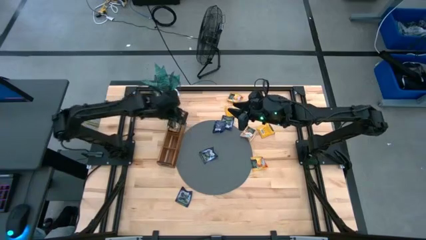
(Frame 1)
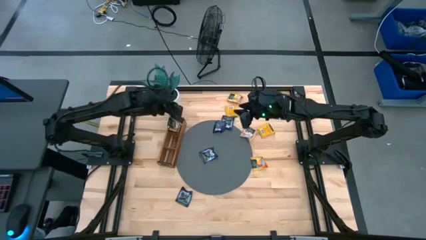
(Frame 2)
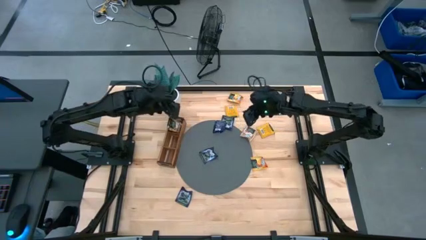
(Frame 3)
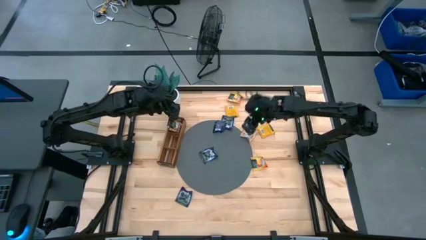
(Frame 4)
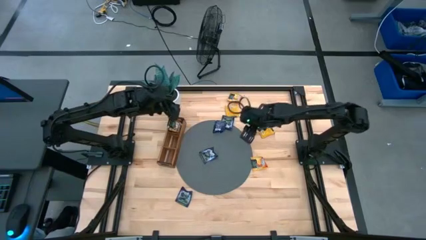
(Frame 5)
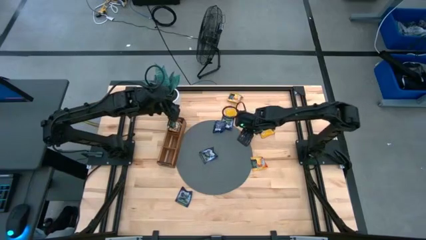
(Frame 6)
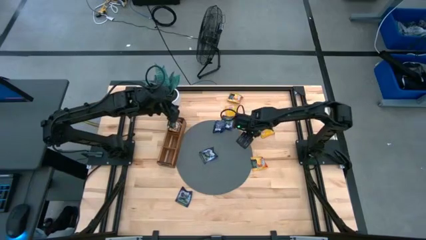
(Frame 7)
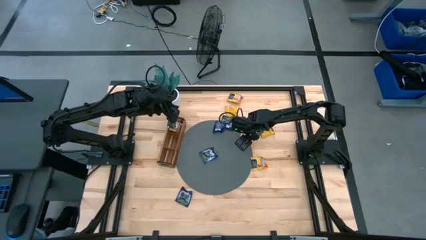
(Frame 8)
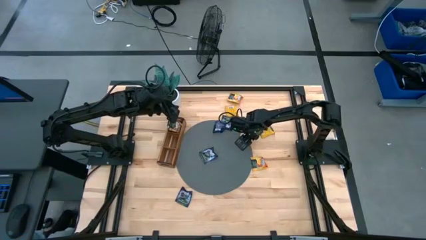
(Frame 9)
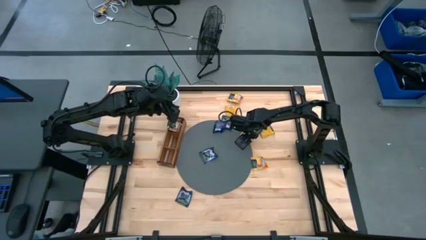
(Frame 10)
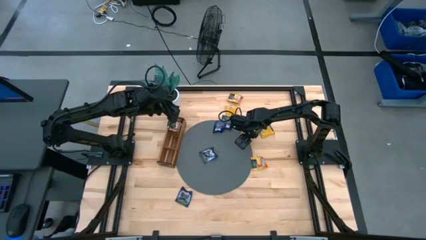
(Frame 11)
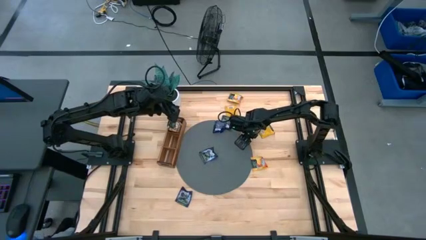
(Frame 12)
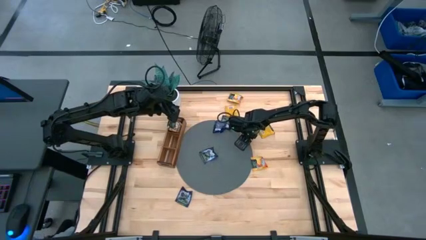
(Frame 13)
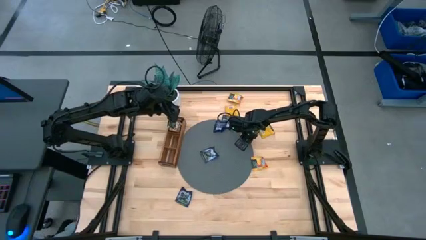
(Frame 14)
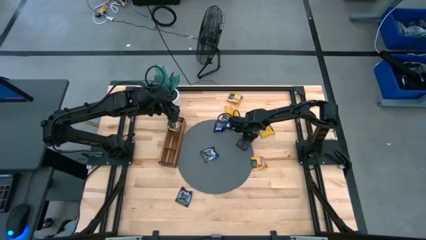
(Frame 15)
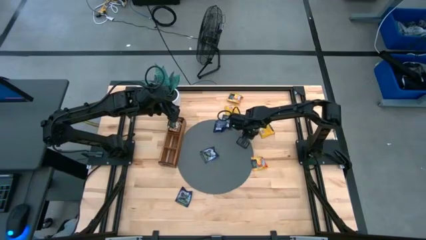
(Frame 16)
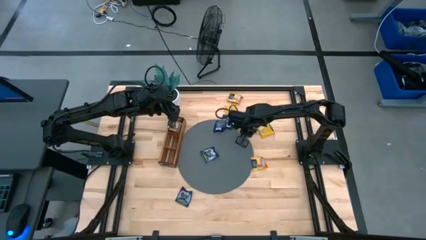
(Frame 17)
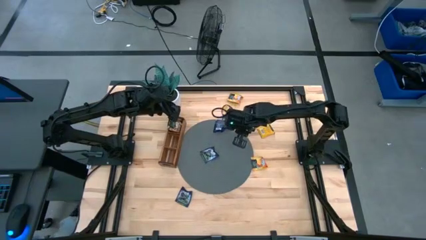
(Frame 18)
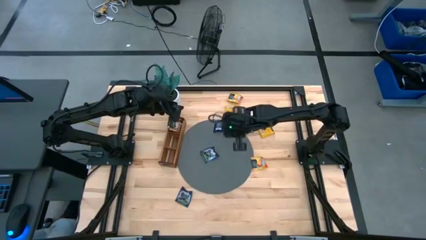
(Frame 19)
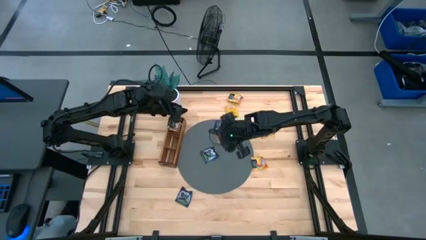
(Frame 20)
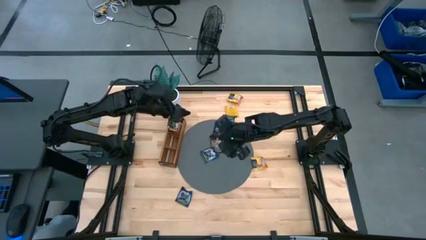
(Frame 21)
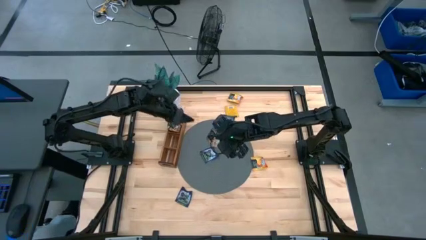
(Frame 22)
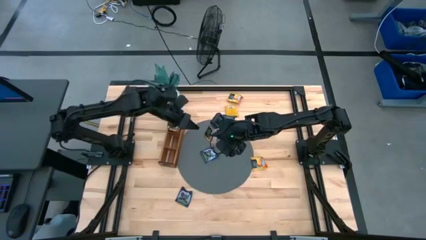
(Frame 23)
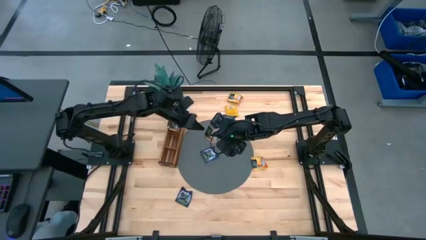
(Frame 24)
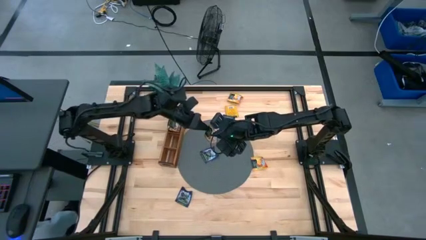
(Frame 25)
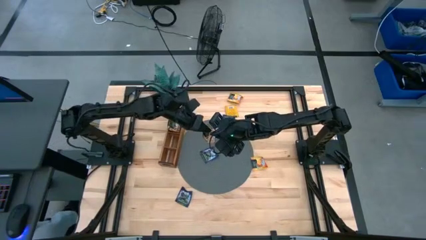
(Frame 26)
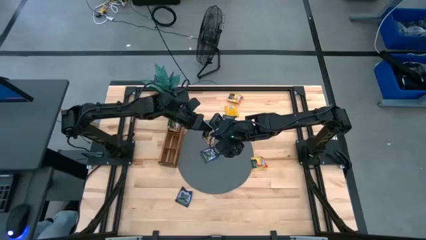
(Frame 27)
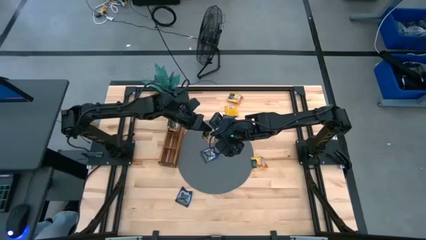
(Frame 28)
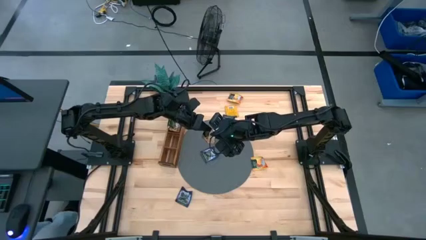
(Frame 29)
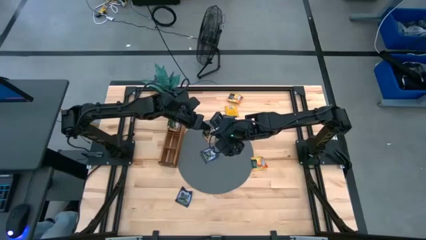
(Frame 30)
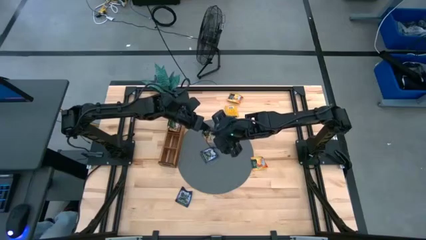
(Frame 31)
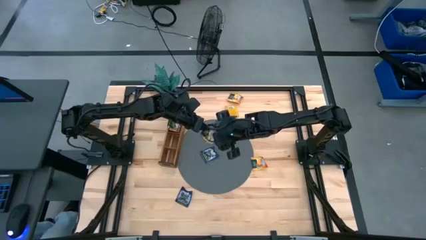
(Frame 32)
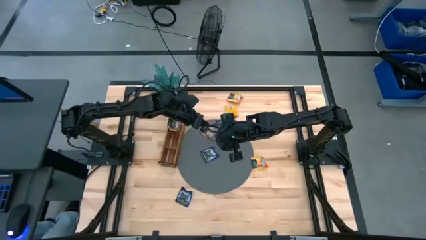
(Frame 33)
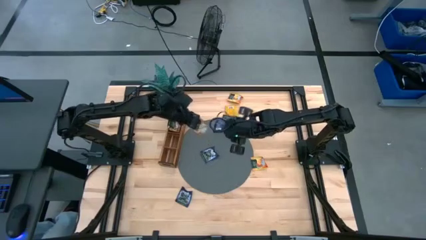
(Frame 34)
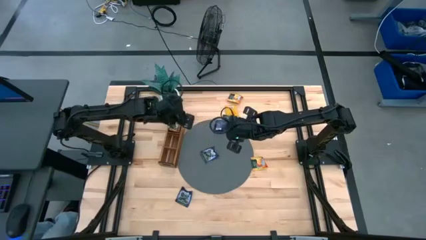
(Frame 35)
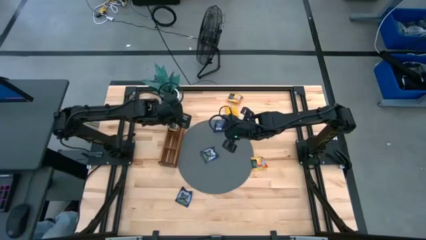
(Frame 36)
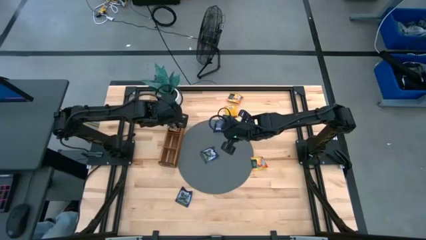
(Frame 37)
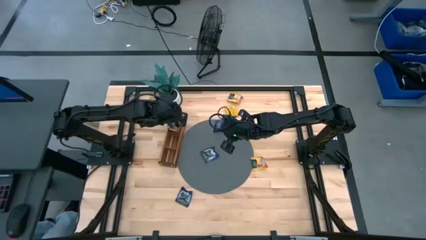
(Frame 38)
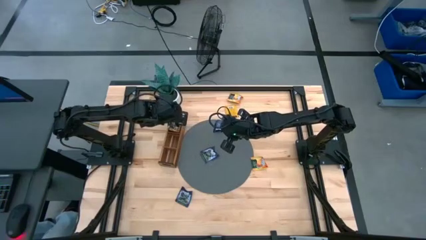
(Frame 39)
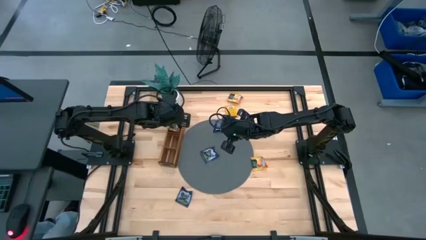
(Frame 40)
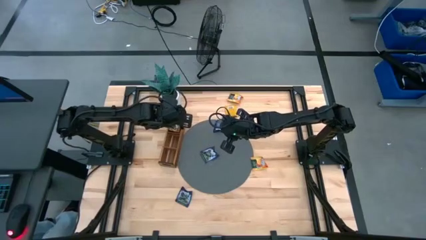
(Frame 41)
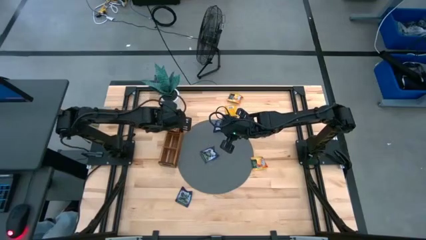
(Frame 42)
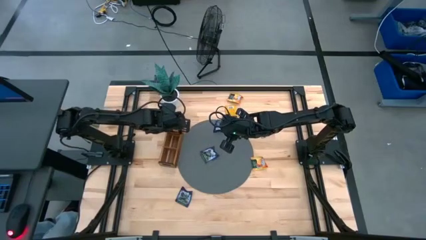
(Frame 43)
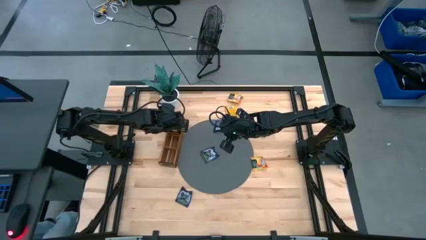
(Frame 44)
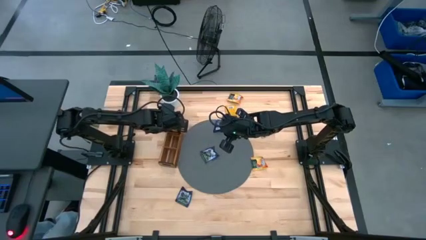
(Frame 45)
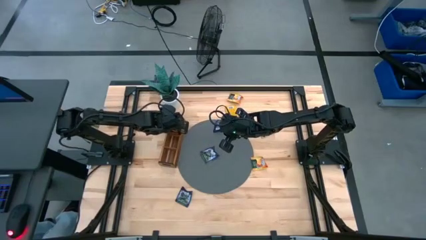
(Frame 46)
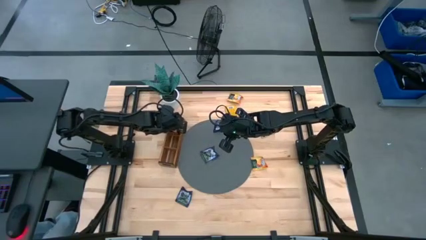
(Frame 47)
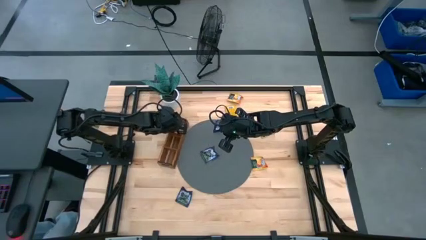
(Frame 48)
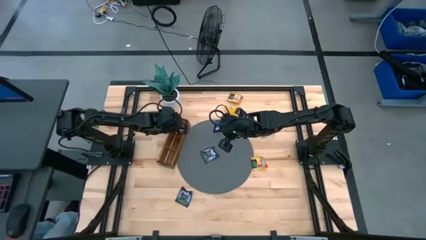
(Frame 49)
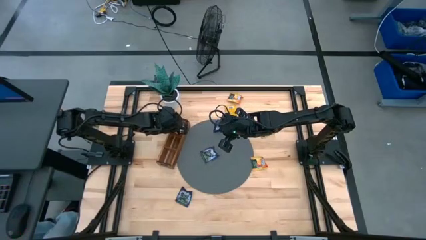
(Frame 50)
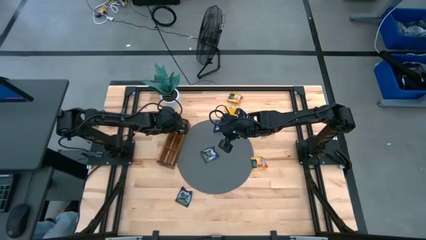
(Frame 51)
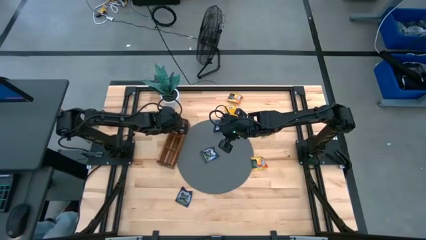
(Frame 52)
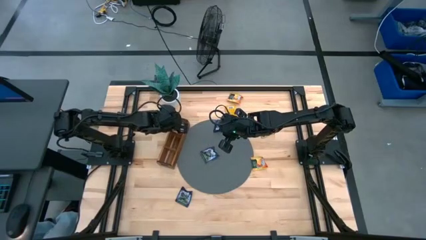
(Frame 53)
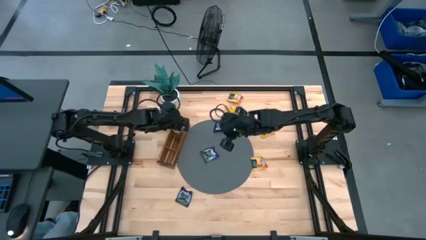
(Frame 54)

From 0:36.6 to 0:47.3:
Task: Pick & Place Tea
Put the brown tea bag into the top section of the wooden organizer

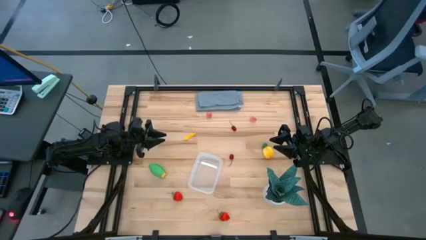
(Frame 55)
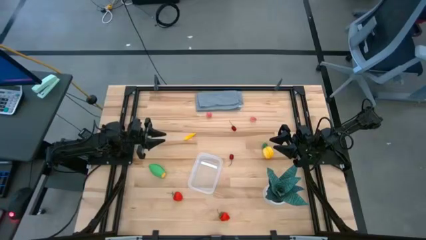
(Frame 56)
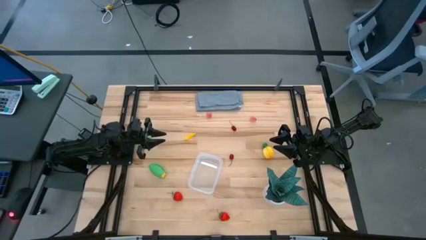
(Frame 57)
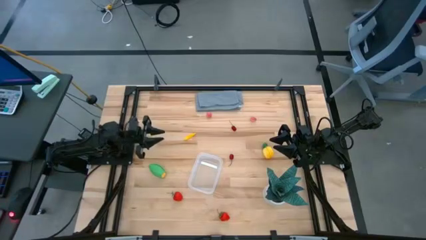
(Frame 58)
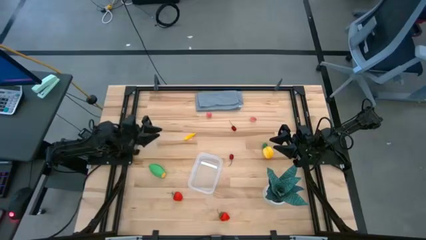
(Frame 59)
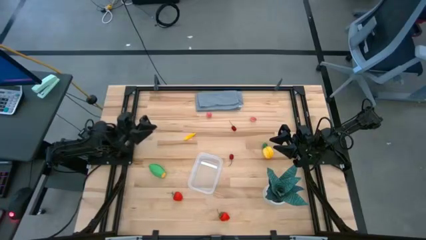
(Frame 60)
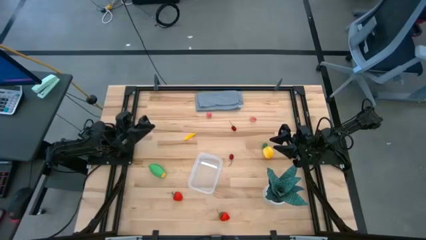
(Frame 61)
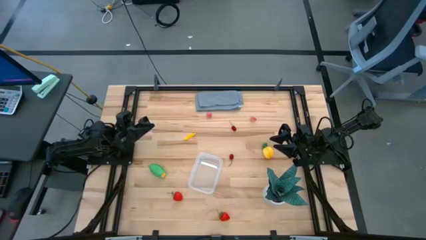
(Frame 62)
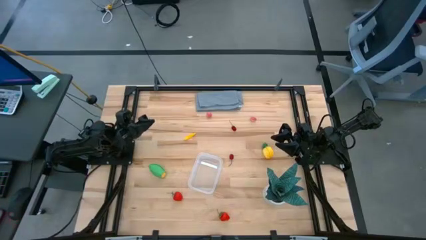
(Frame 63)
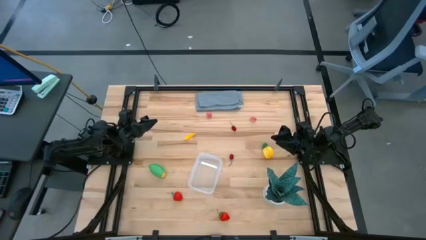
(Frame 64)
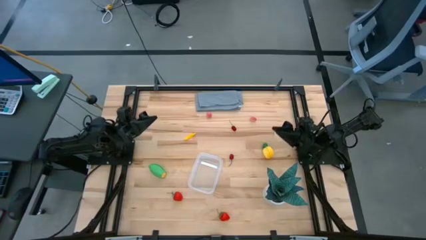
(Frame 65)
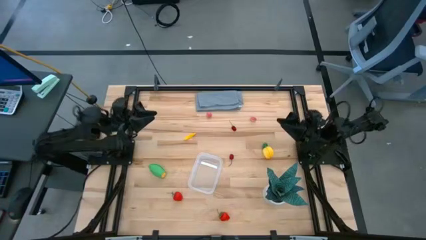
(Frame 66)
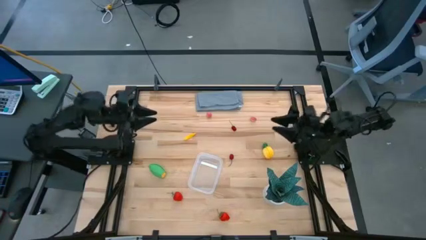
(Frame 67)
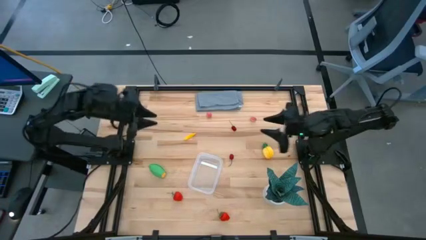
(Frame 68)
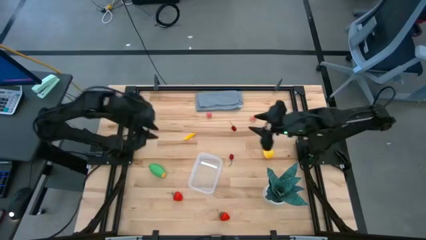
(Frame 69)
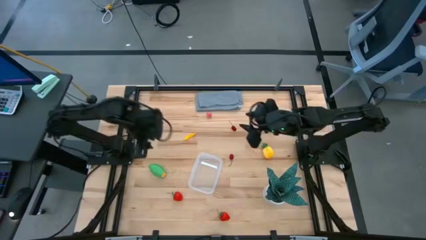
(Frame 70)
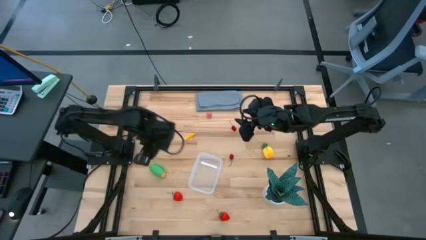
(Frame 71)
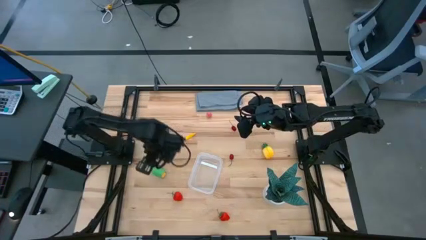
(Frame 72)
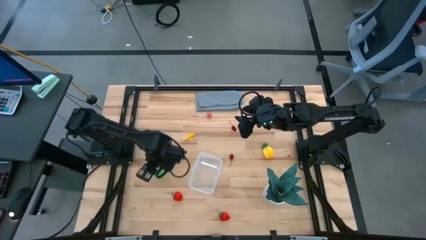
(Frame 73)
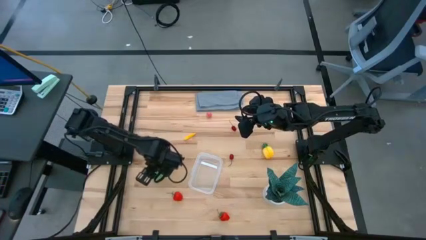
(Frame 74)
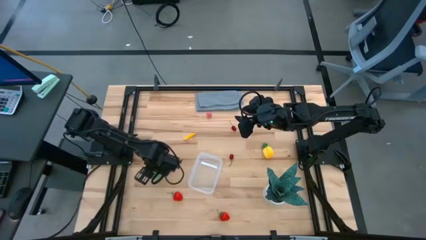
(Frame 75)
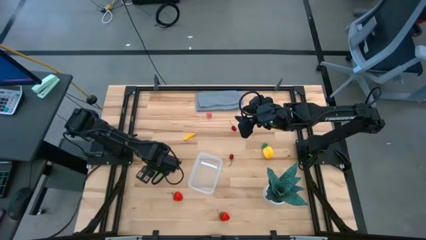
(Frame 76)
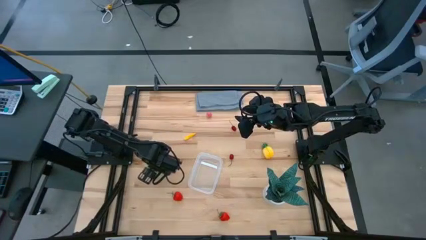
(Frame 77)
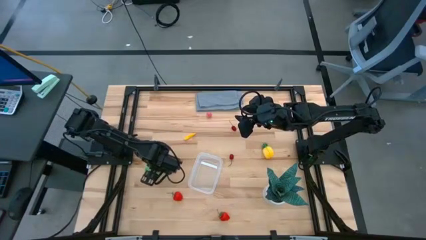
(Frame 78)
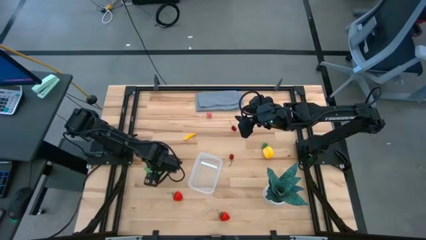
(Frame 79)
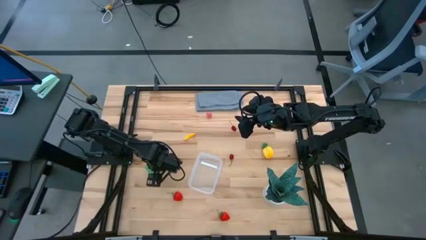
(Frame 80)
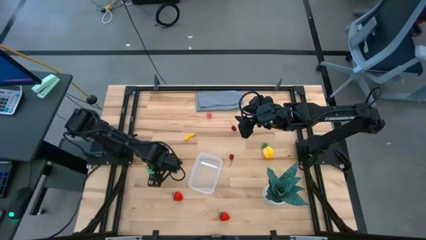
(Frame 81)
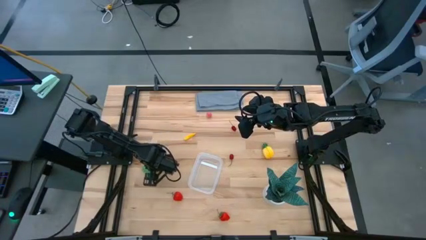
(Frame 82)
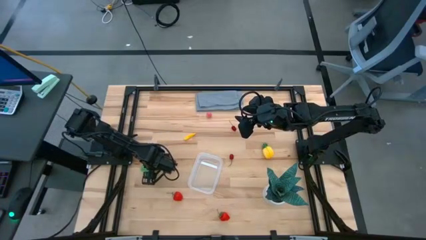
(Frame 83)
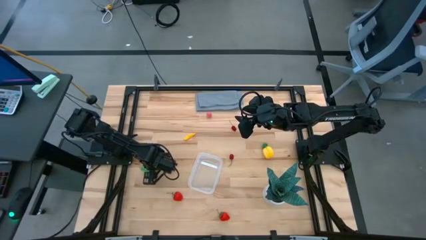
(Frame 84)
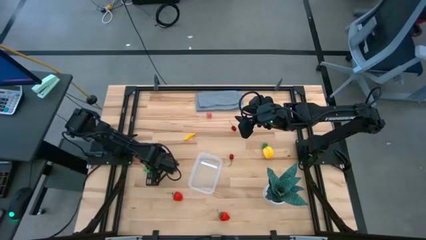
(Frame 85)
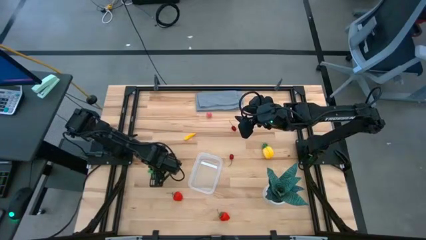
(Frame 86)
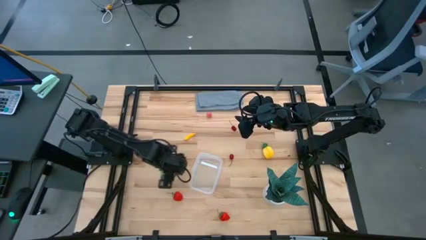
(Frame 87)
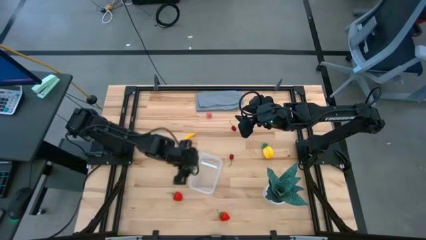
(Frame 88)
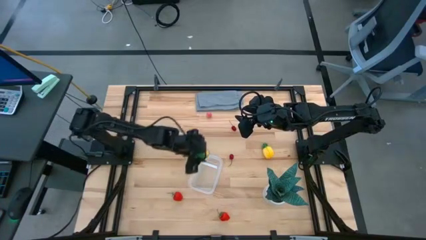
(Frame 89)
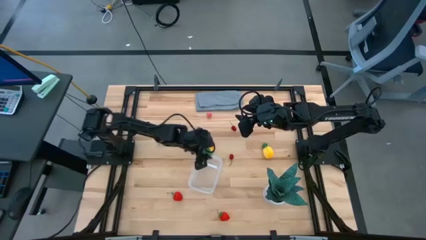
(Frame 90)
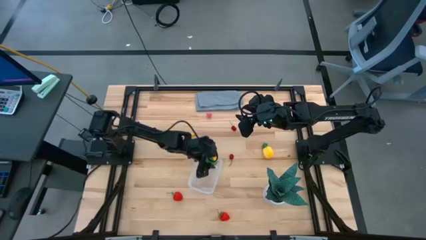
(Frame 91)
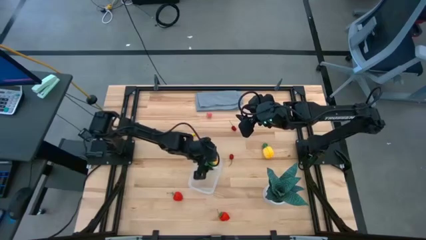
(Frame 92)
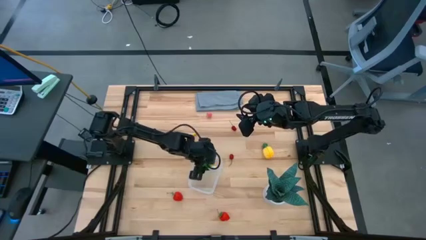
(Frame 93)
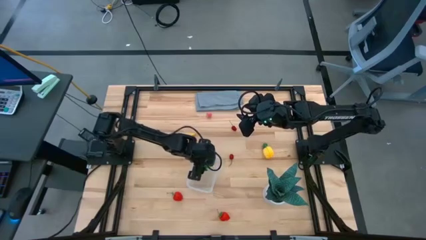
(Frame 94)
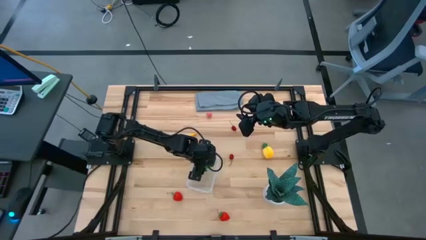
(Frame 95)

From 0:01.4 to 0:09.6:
Task: Pick and placing Produce into tupperware
Put the large corn into the transparent bin
